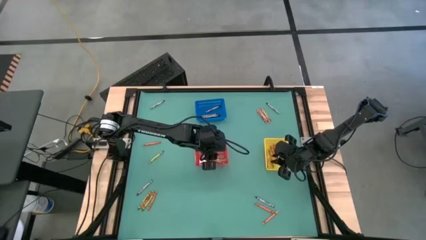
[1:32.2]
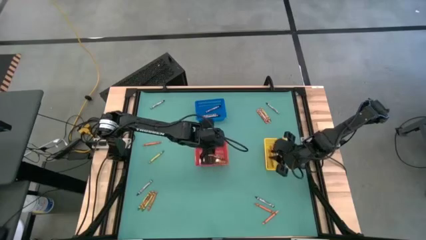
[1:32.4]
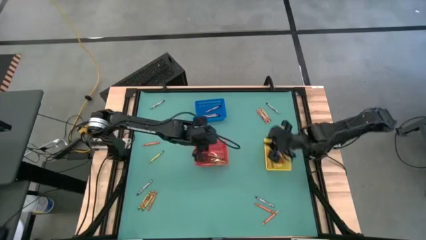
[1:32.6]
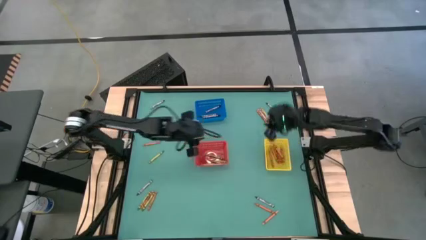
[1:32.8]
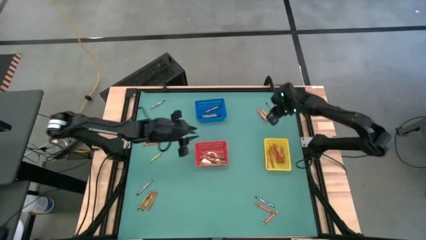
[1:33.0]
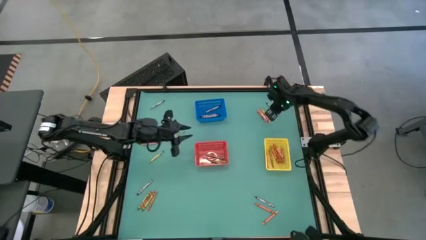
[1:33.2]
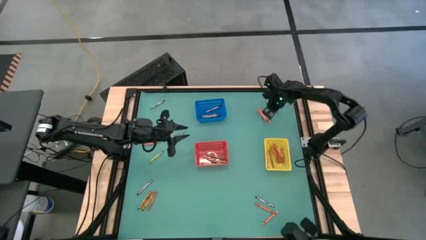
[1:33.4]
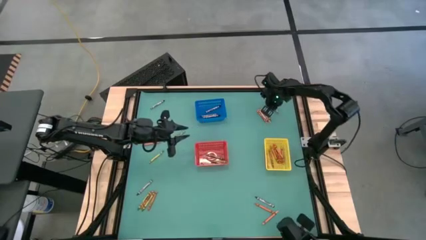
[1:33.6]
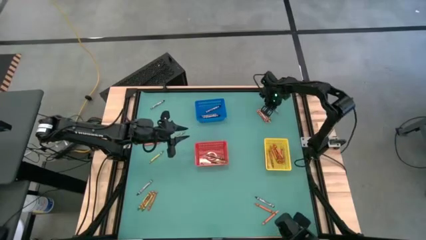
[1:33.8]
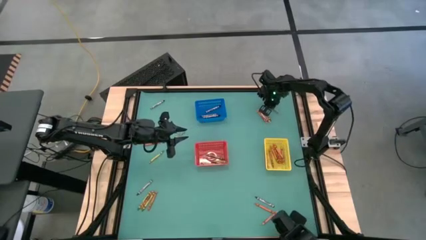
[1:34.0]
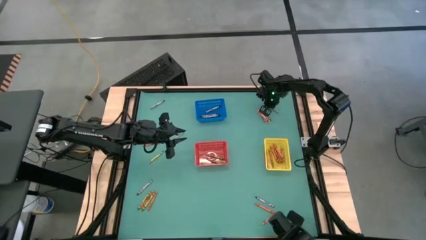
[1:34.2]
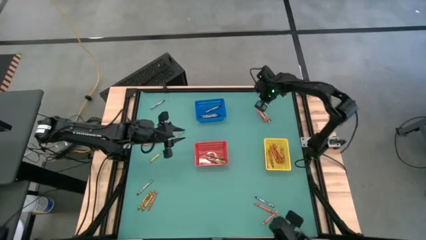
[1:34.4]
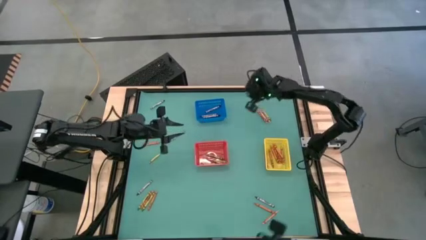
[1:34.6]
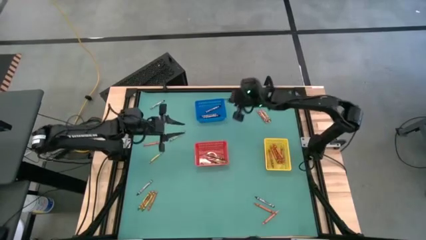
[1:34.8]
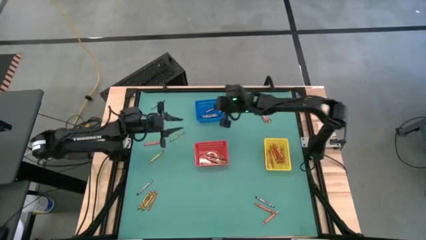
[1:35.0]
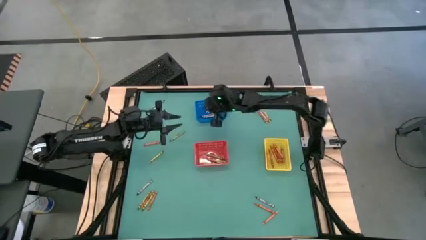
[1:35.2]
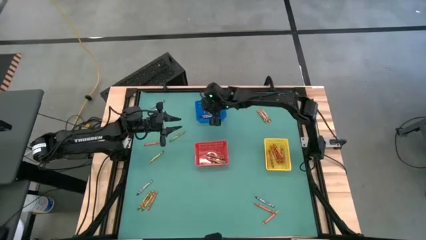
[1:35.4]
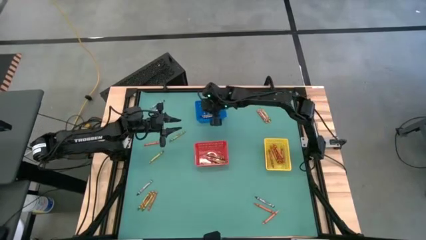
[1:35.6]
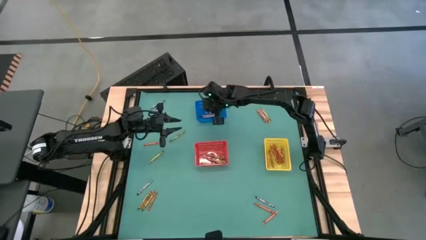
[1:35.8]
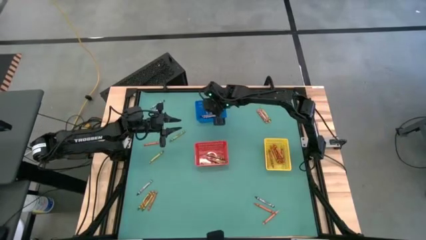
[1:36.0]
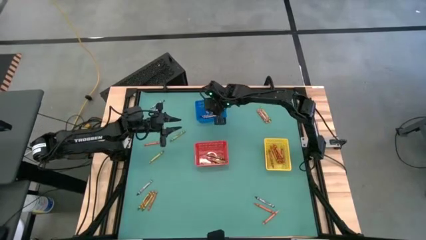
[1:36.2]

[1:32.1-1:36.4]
Task: Sort crayons
Put the black crayon into the blue bin

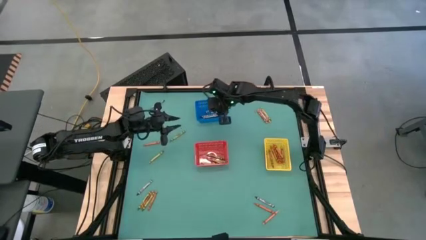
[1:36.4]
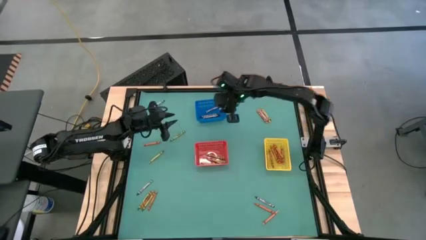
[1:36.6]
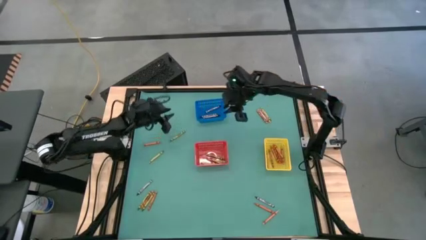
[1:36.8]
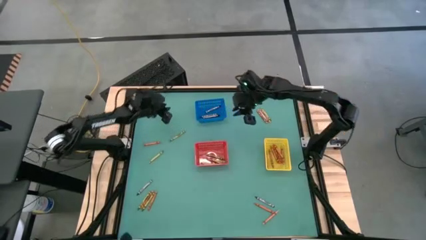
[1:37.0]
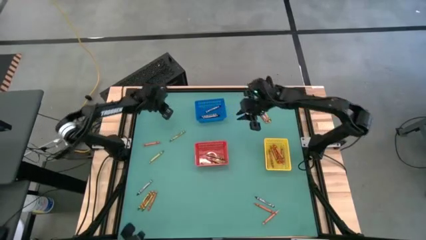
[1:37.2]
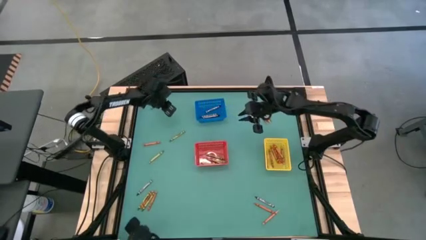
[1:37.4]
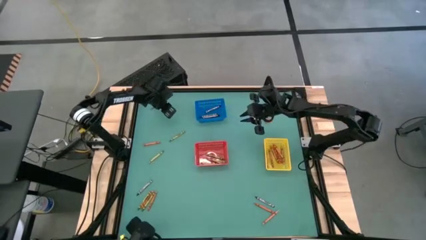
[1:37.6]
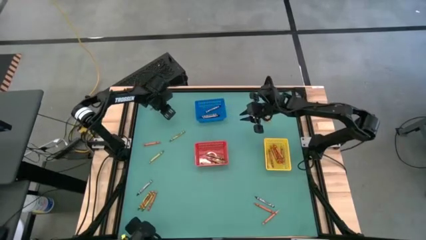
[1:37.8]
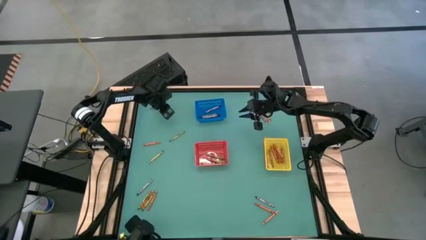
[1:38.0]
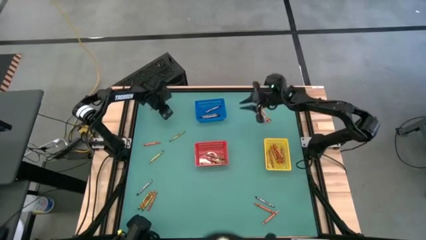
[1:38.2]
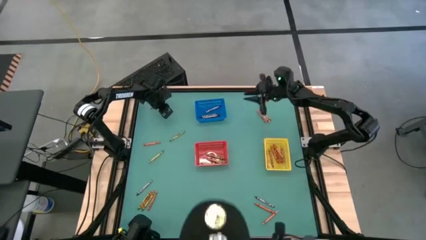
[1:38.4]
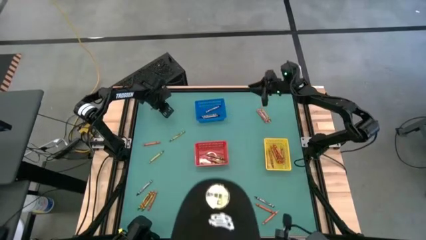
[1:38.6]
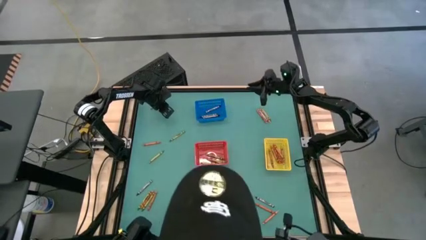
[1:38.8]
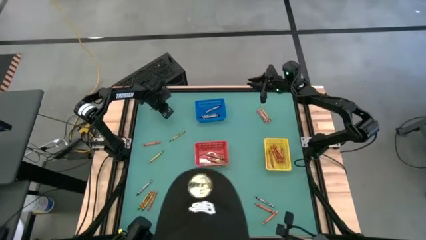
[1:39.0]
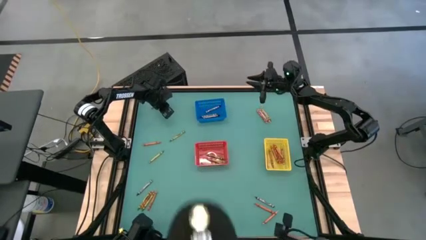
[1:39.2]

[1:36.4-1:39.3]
Put the green crayon into the red bin

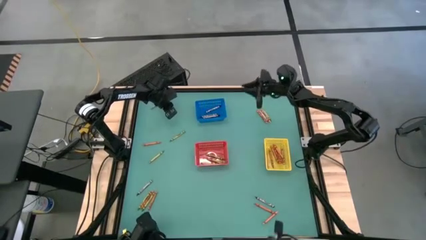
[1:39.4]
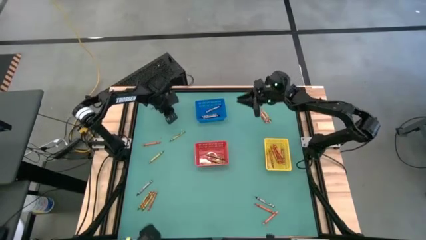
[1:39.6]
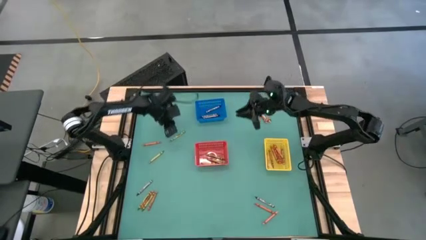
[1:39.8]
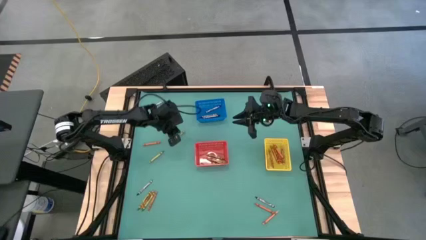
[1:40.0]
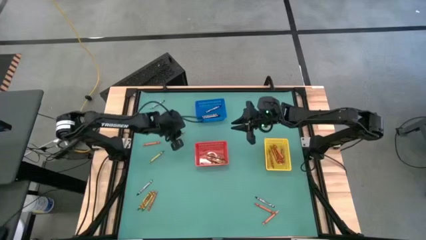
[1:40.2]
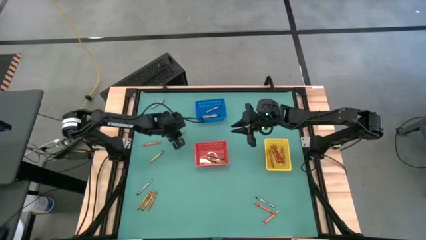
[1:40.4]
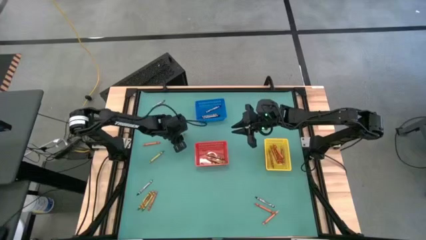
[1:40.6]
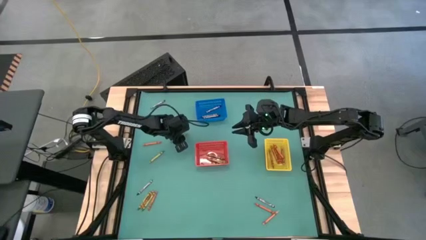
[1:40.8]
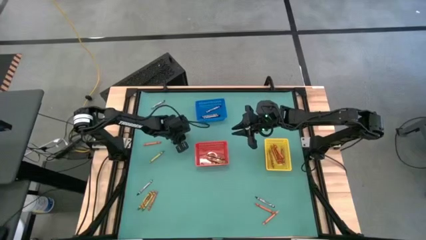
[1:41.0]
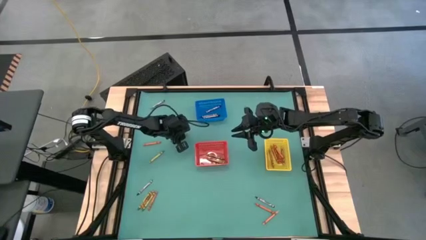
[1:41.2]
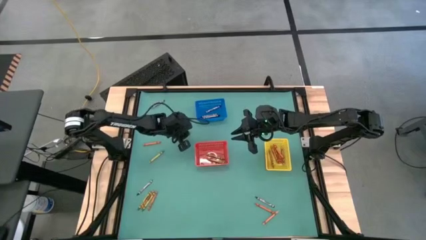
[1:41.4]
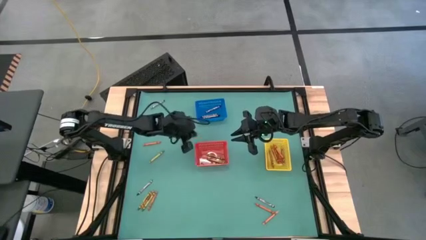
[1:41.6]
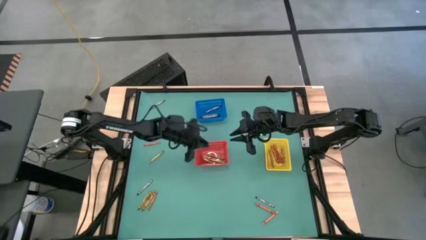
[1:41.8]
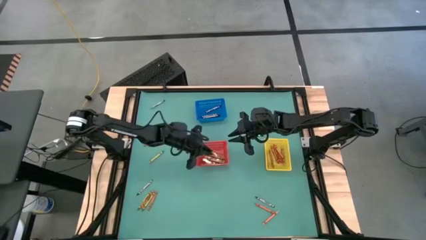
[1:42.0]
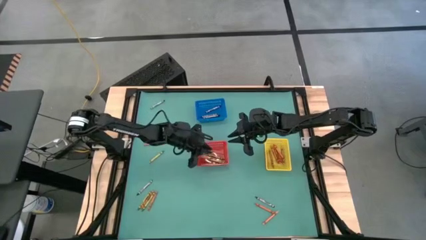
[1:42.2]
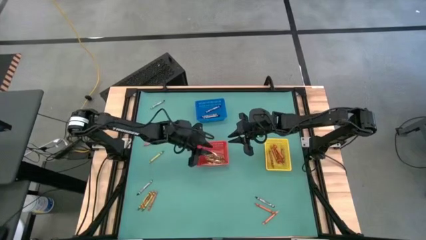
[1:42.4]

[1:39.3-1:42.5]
Put the green crayon into the red bin

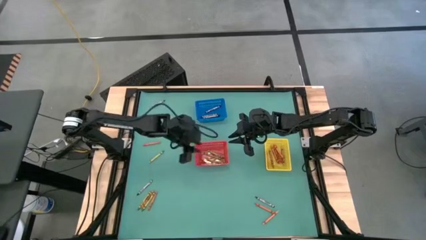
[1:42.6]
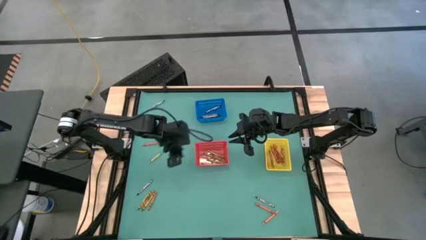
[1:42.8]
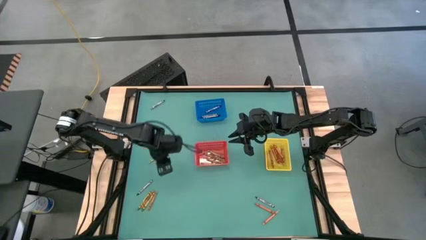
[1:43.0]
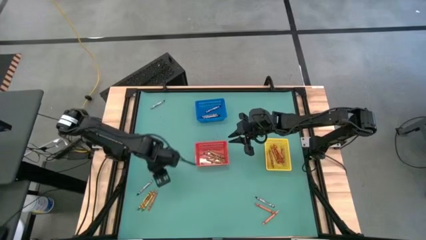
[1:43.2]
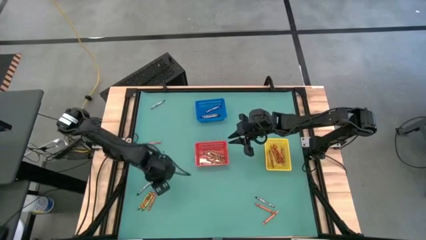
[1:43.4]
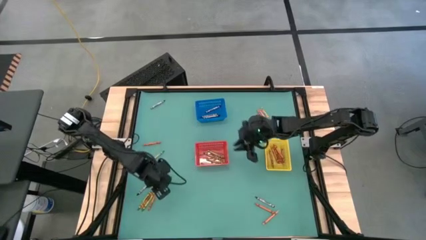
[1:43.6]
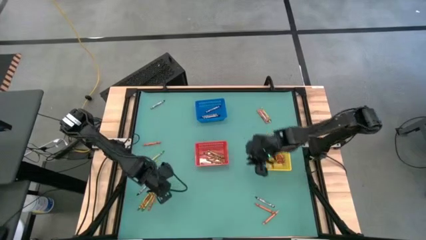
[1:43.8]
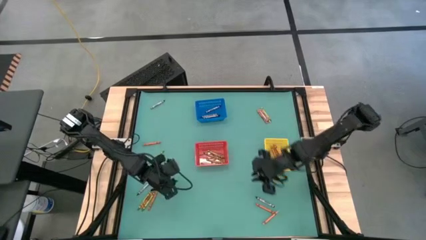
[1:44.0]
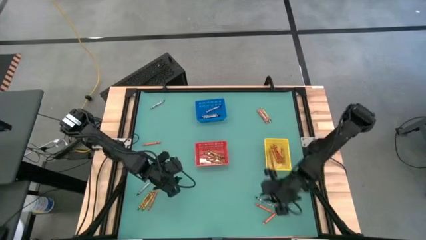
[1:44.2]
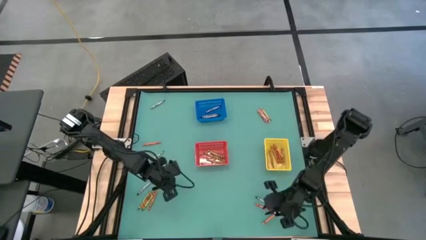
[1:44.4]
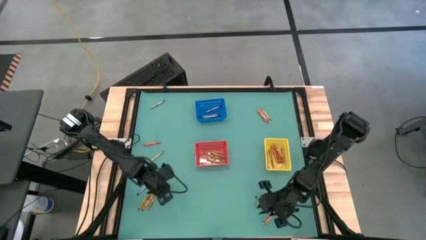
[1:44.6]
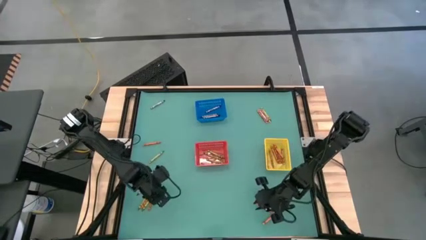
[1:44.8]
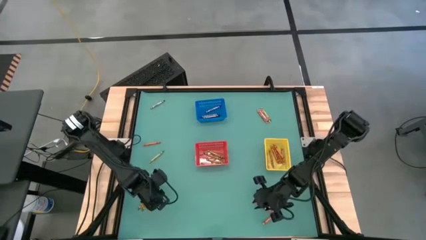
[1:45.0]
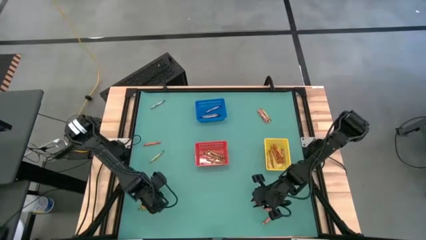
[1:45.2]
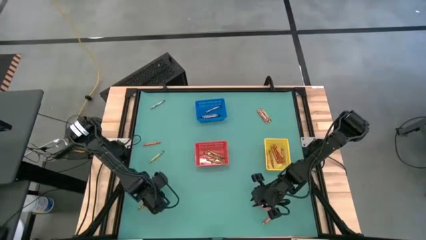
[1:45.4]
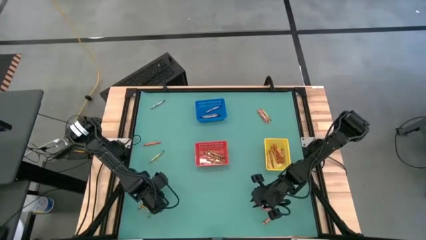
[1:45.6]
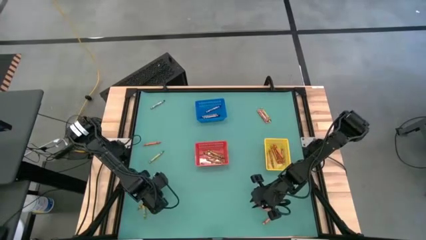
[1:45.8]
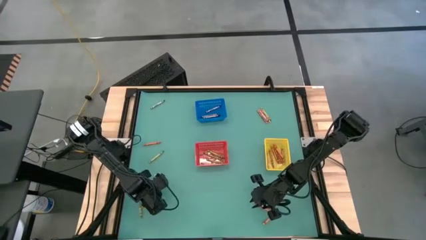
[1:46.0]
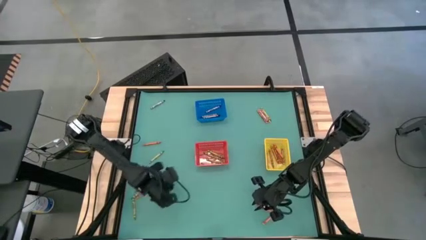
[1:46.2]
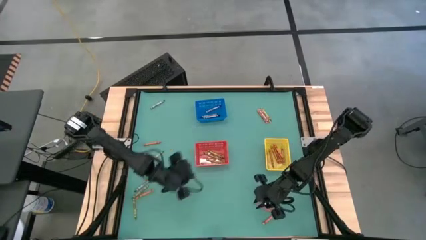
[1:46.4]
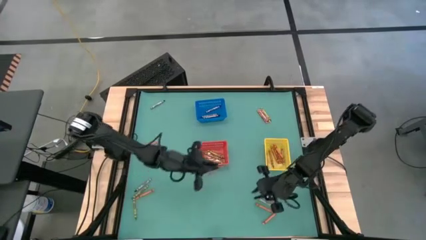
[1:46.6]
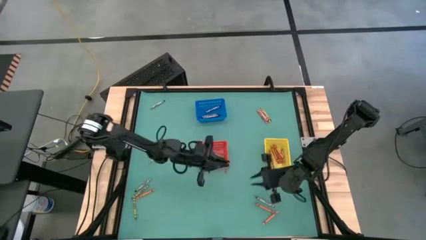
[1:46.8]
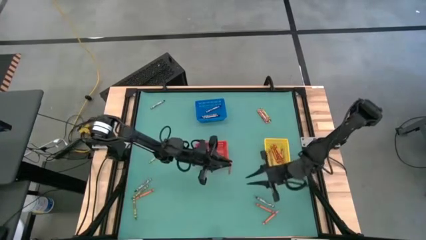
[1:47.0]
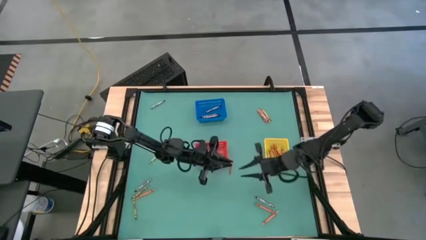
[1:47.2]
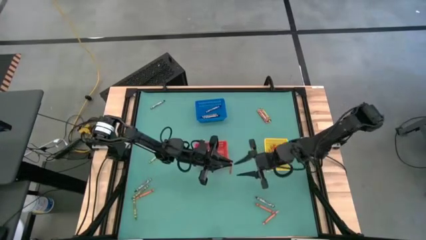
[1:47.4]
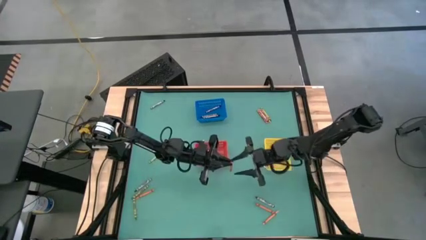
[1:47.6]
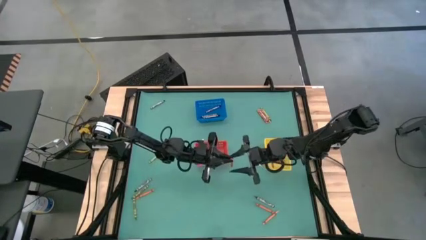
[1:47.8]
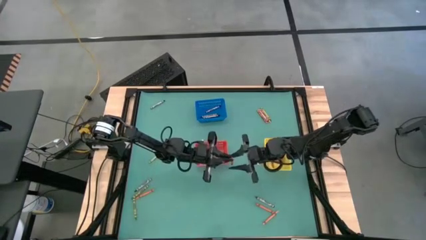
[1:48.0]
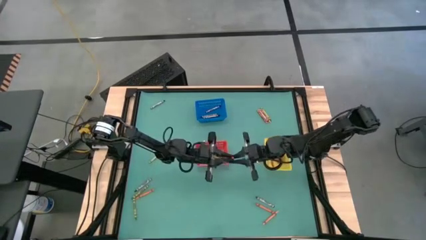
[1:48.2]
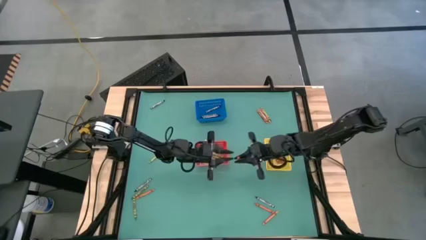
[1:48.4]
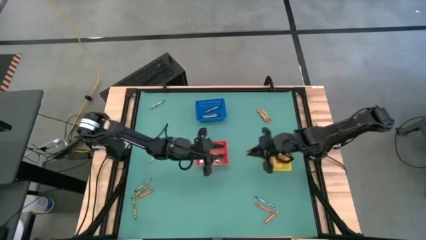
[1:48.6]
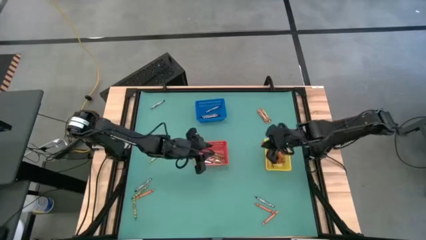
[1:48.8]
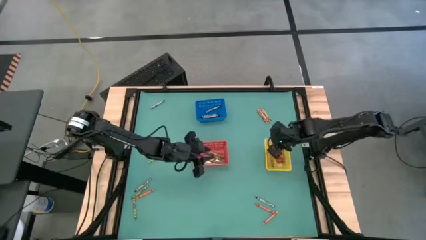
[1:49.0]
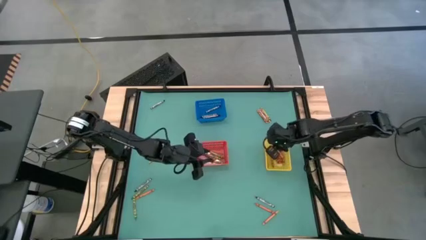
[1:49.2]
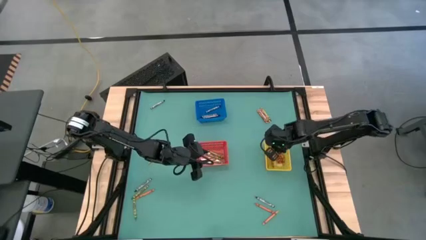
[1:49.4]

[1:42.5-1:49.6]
Put the orange crayon into the yellow bin
